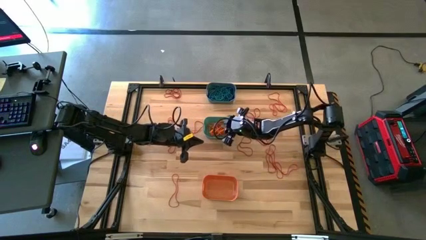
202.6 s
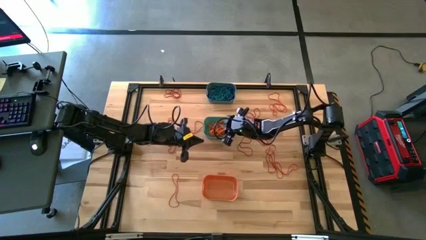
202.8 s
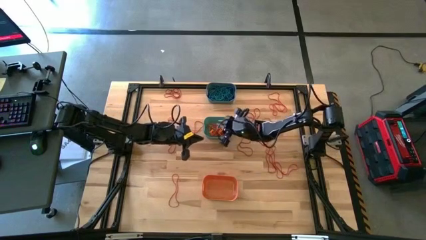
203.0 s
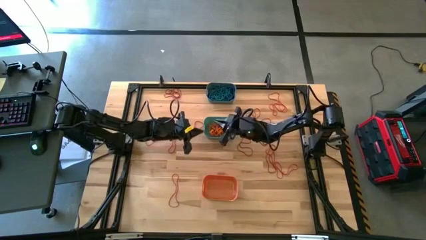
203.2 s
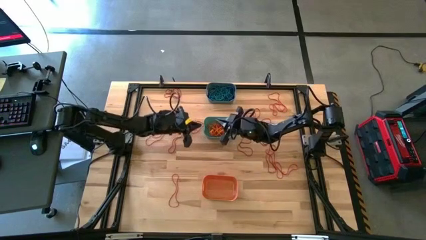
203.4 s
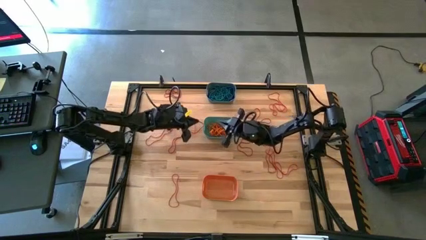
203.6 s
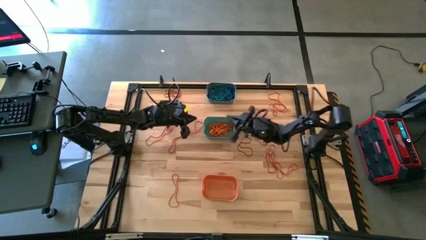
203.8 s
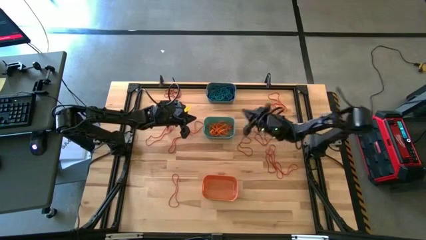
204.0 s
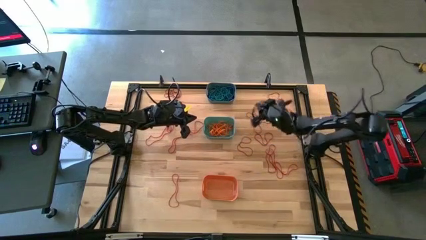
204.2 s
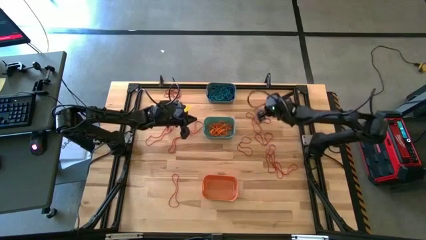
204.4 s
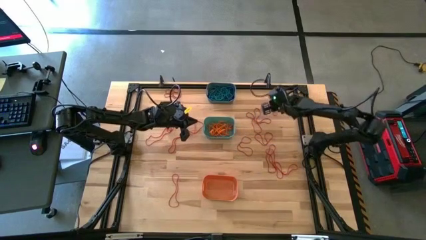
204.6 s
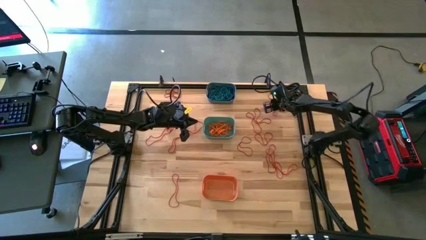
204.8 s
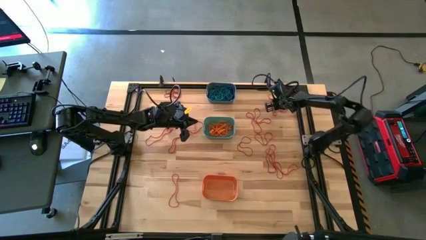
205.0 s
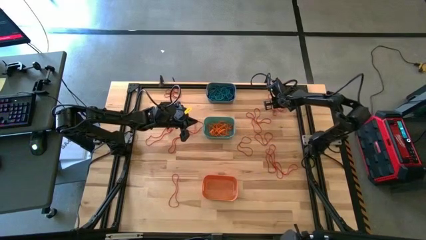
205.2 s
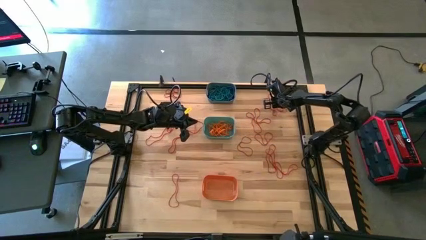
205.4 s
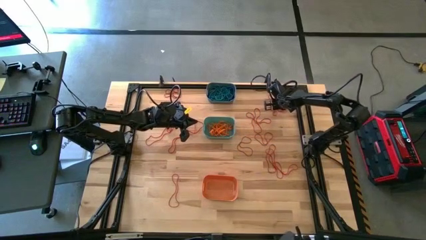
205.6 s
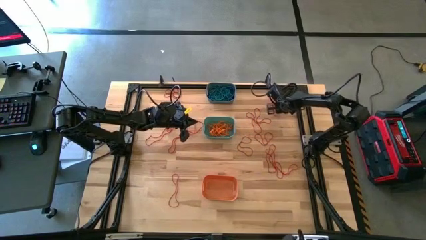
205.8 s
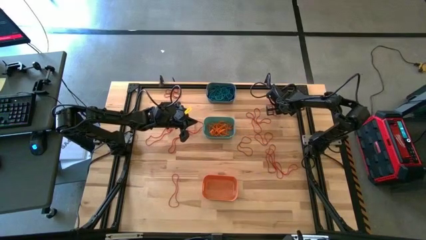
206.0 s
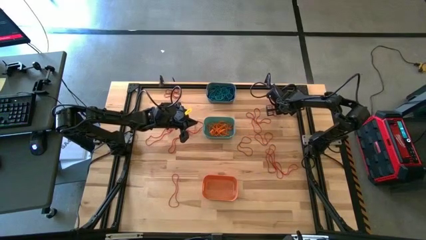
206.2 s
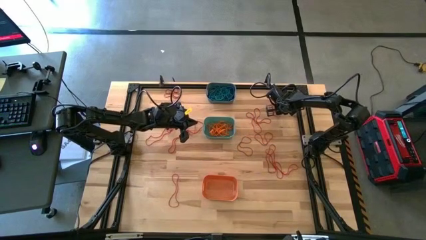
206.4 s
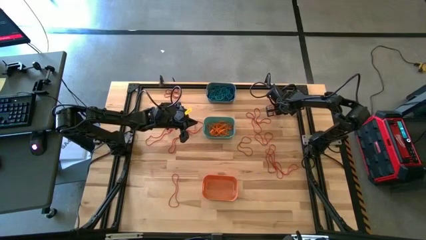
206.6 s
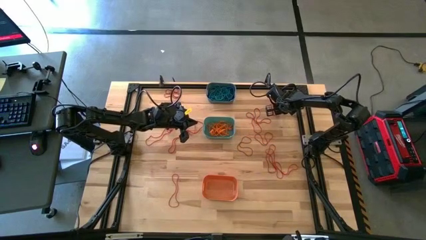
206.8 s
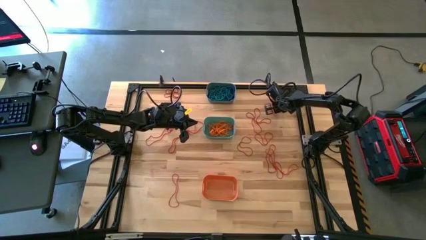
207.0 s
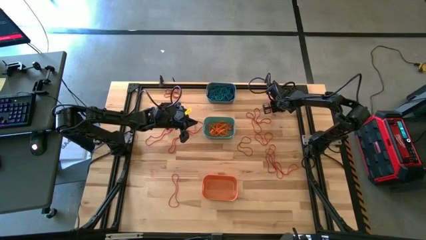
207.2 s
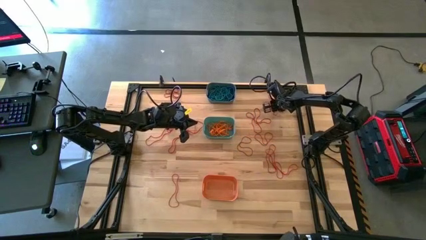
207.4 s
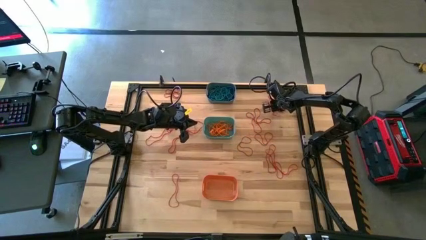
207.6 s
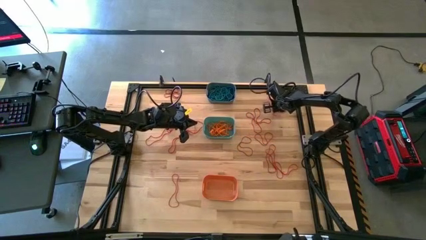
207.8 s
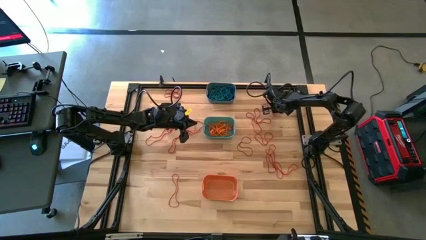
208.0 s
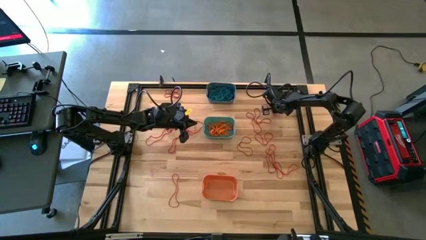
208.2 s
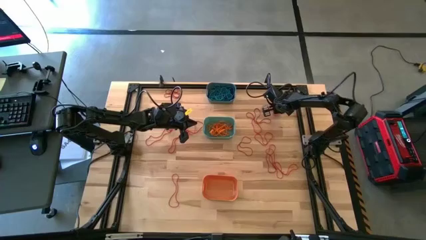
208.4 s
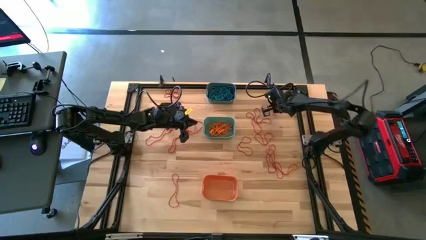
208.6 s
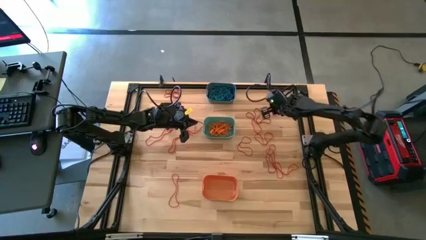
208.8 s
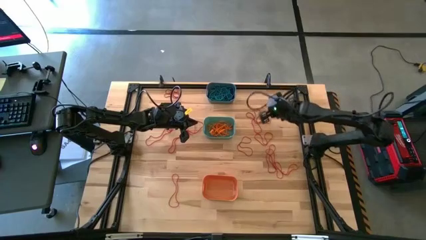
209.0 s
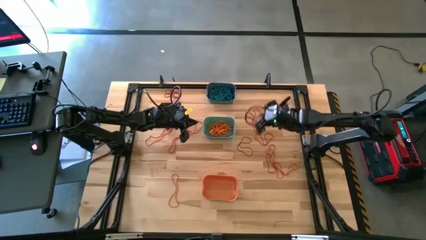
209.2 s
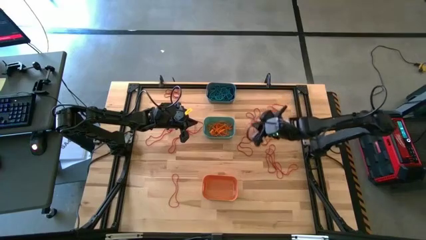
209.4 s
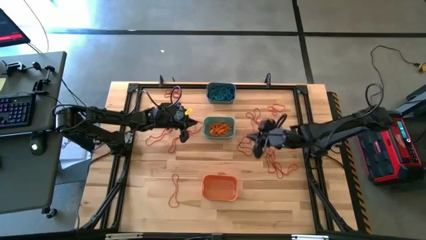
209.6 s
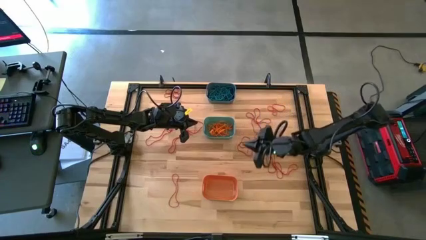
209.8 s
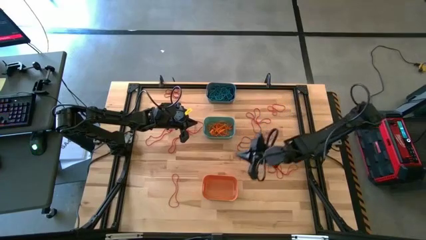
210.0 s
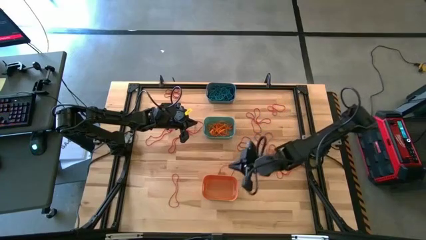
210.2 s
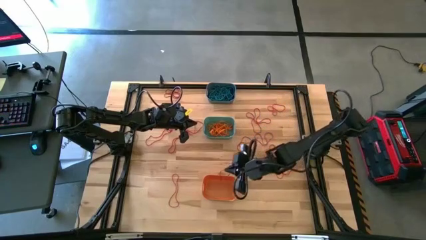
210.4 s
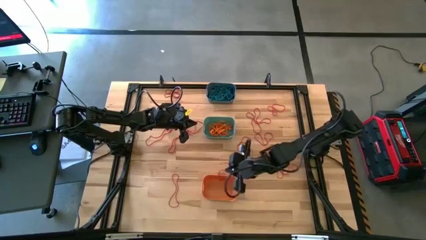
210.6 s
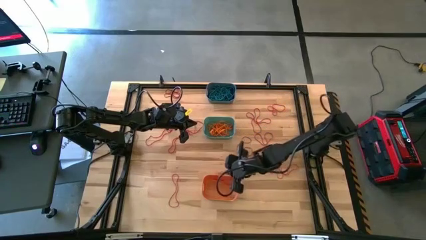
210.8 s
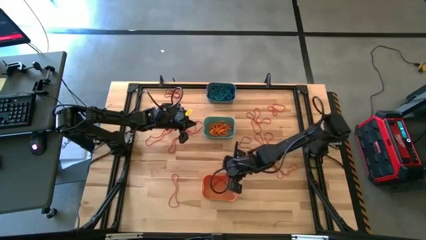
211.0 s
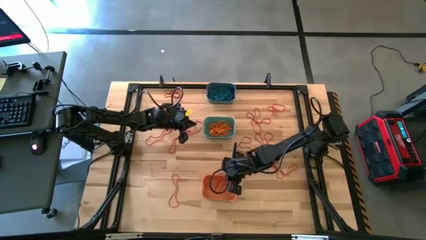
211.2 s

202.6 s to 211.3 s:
Task: Sort rubber bands into baskets
Put the red rubber band into the orange bin

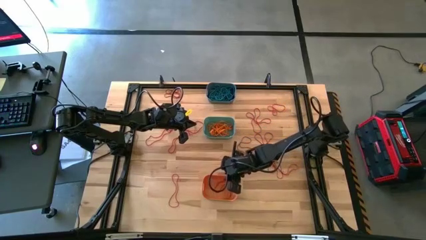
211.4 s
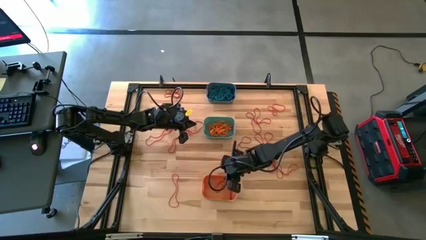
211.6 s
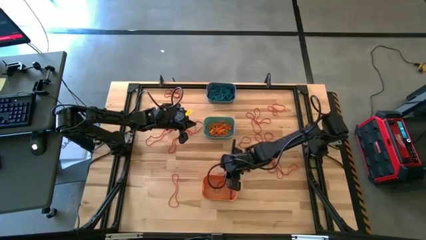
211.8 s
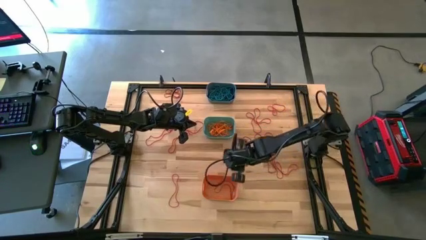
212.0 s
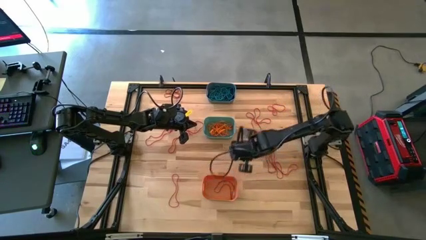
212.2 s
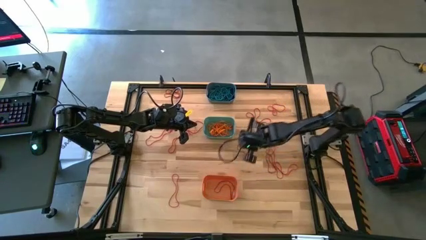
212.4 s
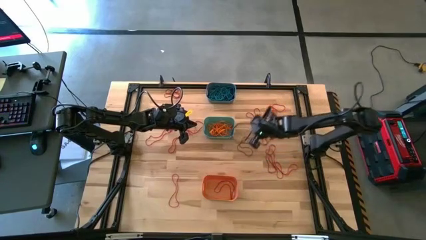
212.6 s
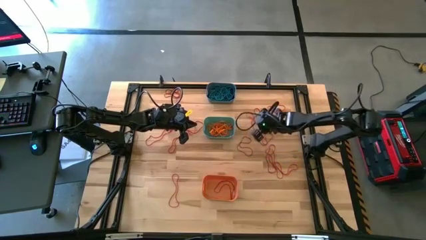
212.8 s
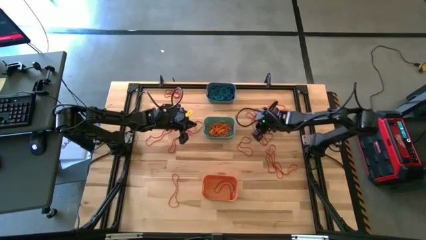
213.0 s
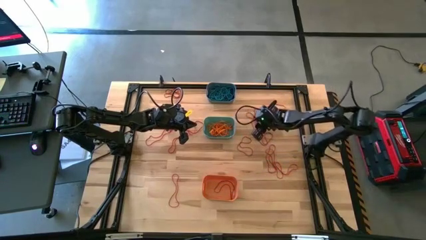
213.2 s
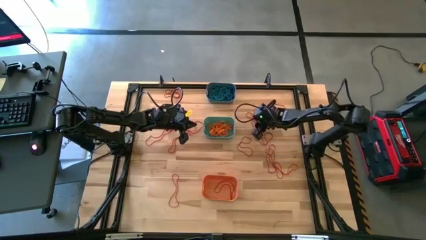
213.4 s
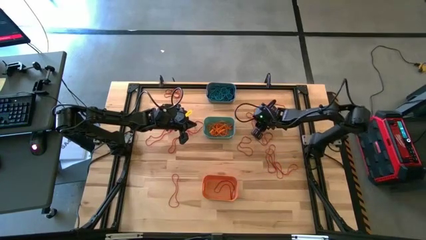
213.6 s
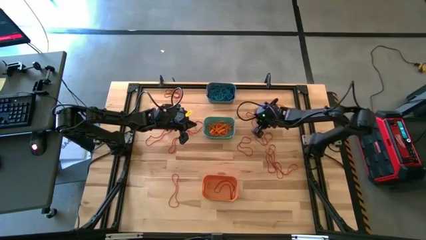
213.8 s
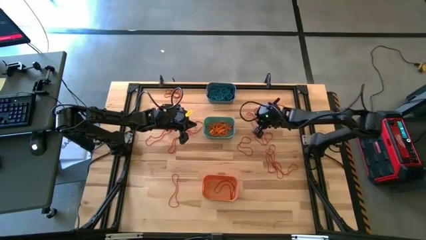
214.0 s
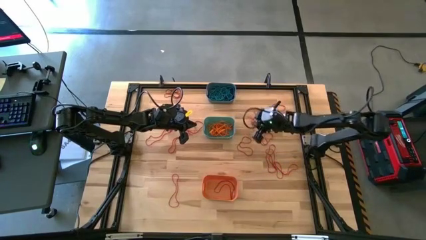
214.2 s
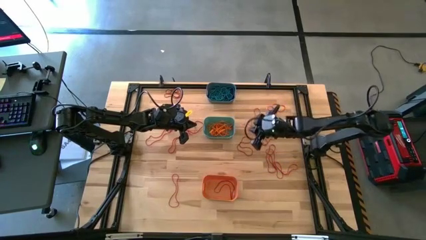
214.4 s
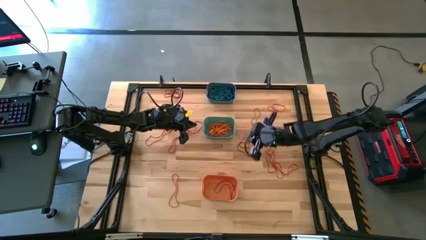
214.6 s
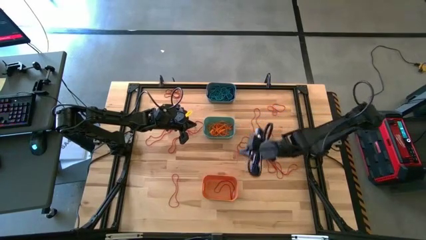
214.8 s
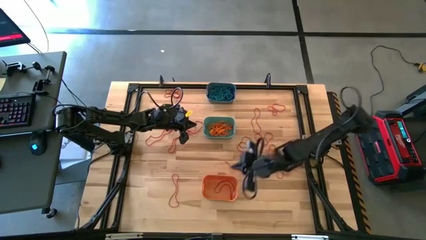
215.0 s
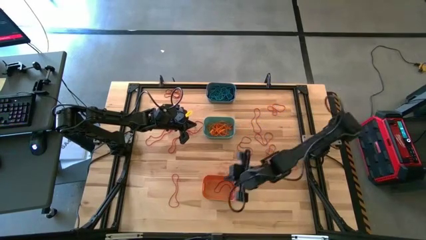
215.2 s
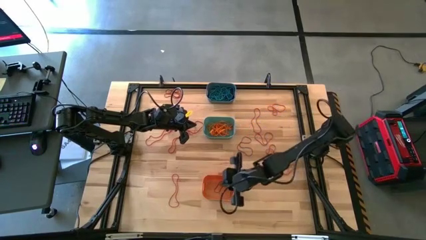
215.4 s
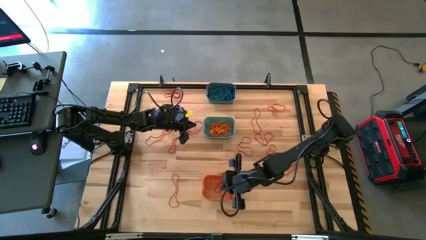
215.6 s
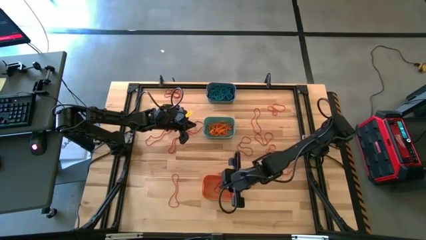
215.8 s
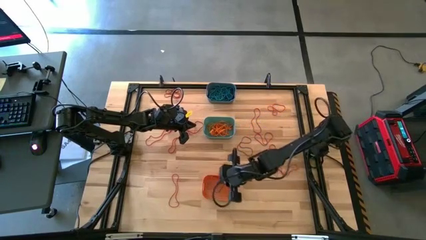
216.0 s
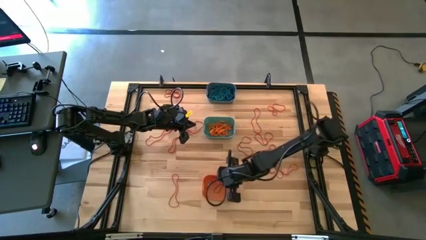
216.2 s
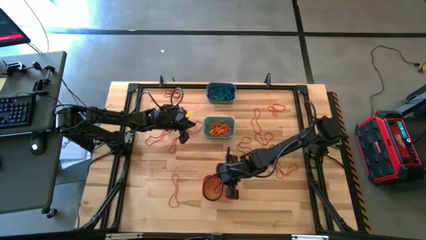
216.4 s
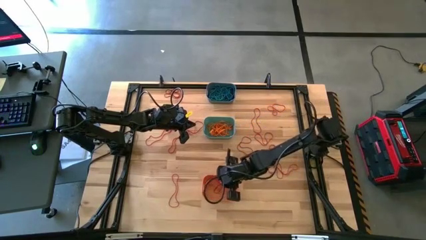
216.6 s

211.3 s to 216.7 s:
Put the red rubber band into the orange bin

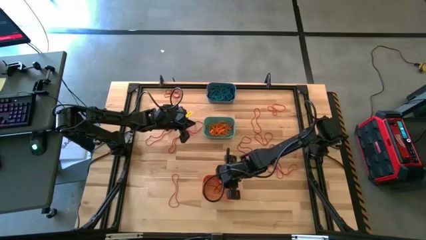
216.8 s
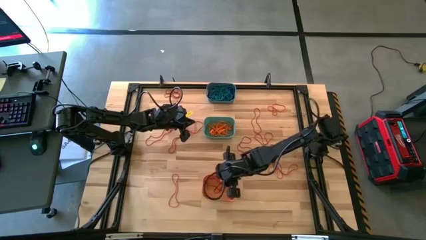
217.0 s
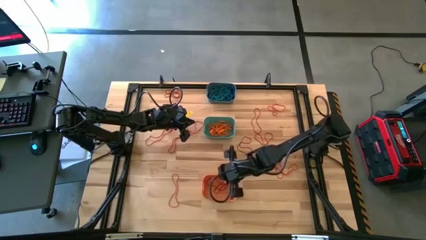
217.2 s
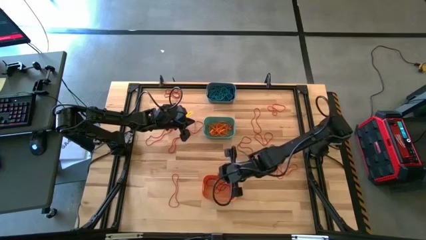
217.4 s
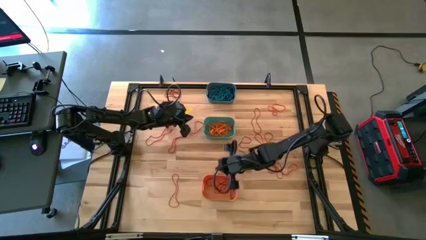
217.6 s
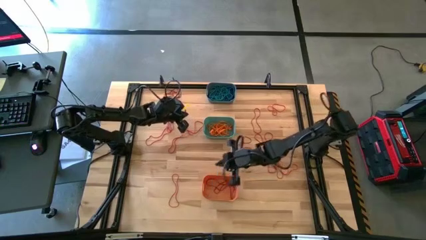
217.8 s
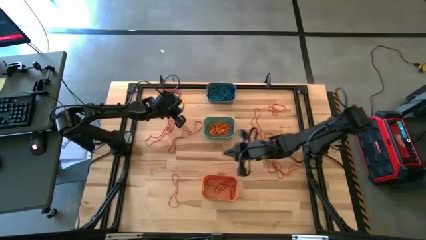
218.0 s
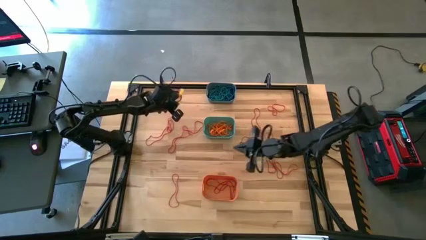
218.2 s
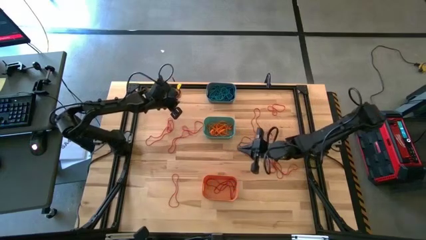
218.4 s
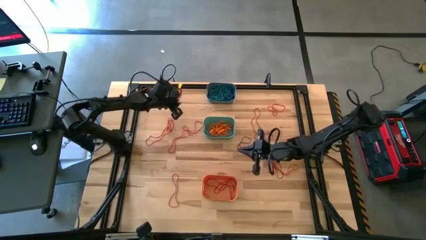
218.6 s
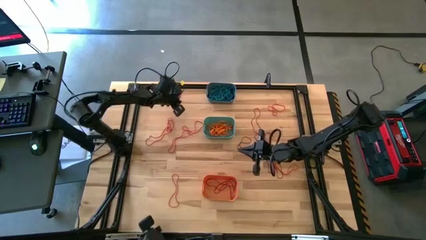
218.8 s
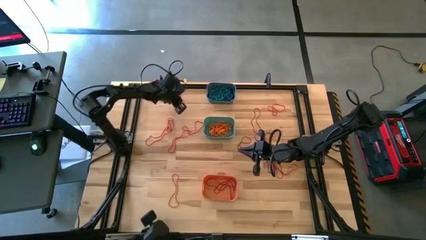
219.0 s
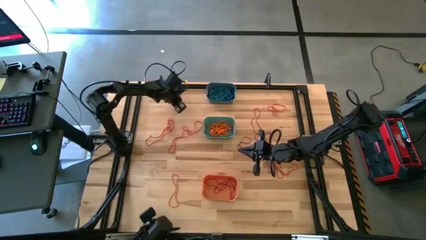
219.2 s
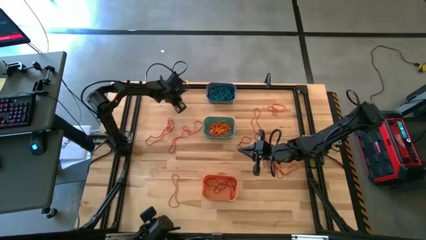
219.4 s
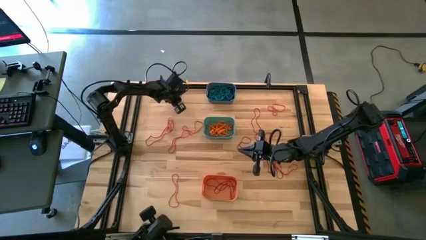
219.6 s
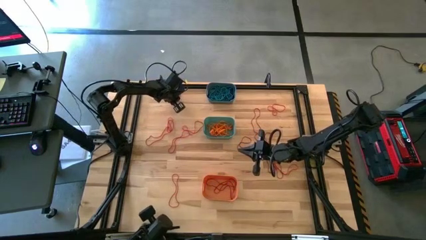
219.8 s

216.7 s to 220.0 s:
Put the red rubber band into the orange bin
